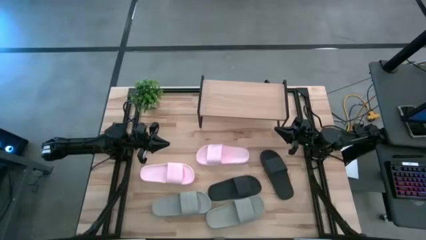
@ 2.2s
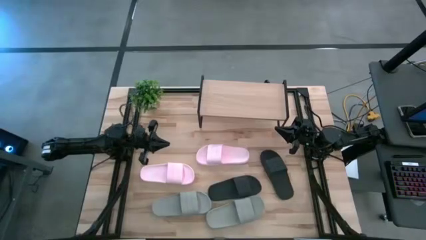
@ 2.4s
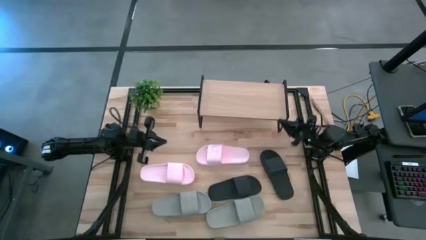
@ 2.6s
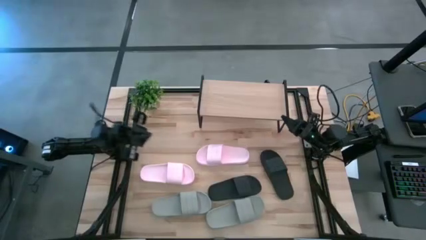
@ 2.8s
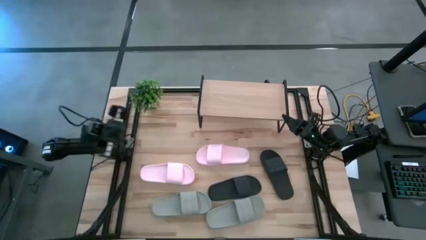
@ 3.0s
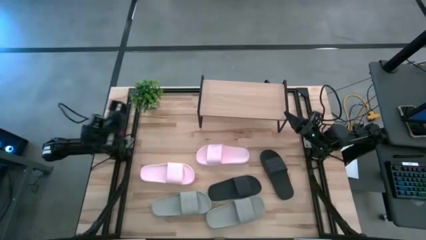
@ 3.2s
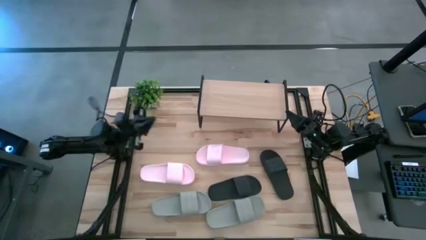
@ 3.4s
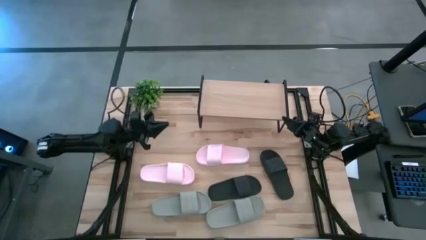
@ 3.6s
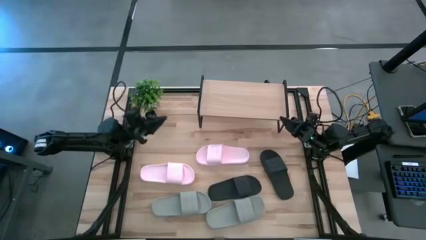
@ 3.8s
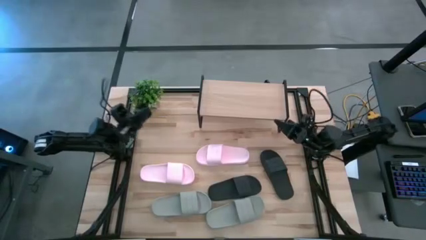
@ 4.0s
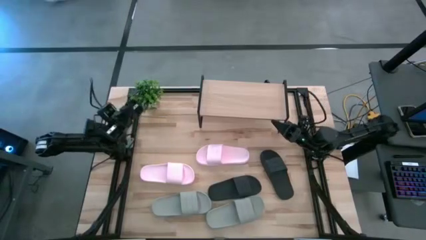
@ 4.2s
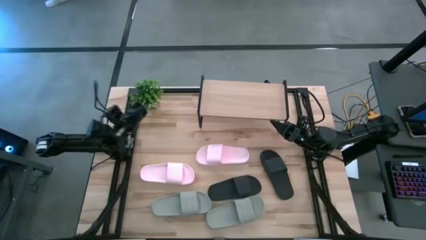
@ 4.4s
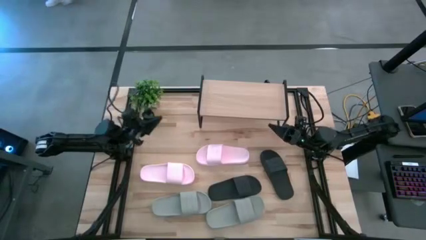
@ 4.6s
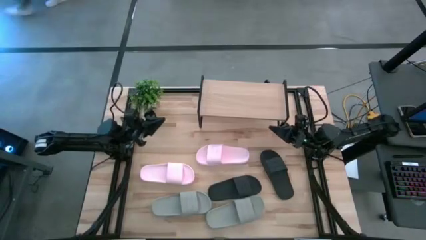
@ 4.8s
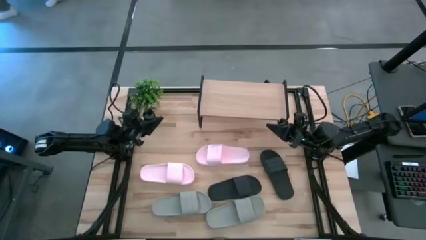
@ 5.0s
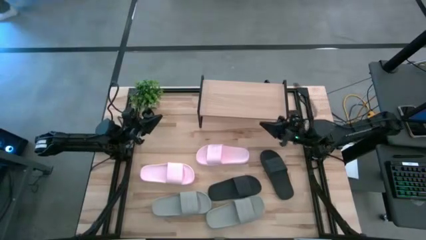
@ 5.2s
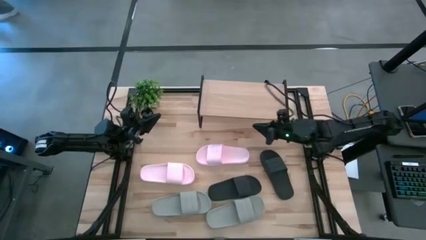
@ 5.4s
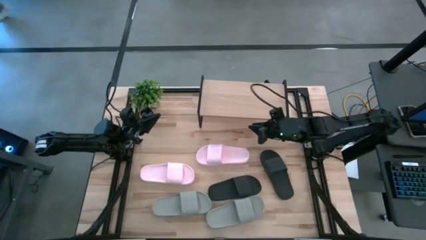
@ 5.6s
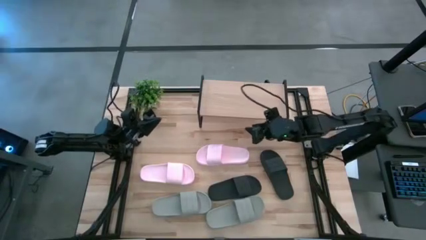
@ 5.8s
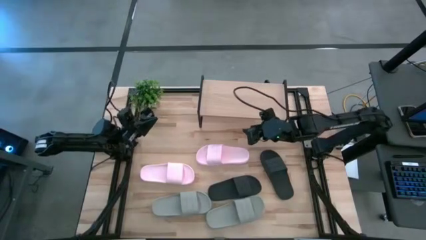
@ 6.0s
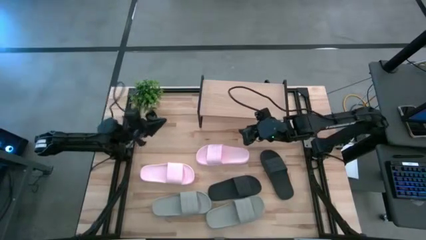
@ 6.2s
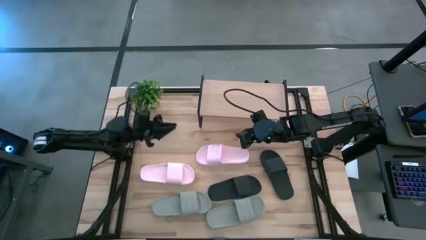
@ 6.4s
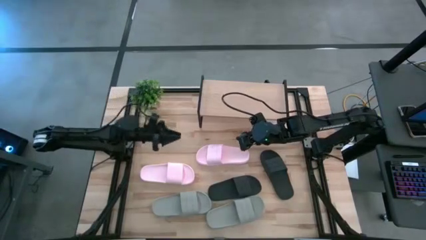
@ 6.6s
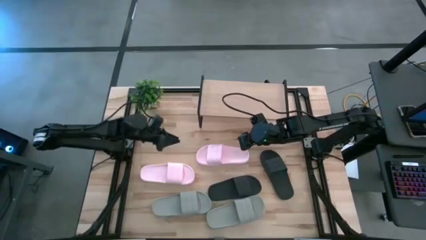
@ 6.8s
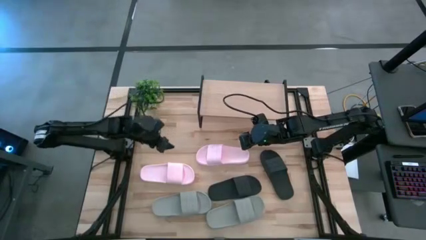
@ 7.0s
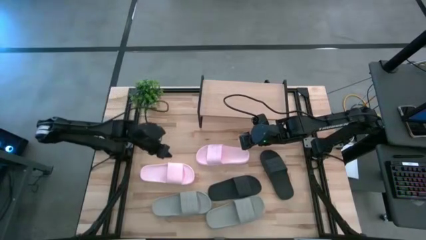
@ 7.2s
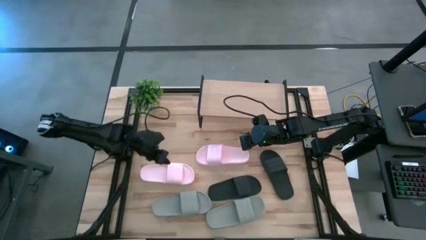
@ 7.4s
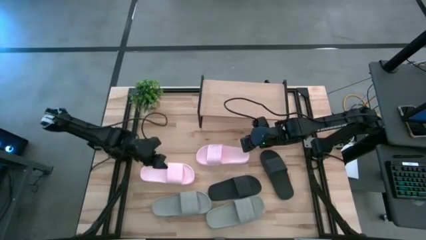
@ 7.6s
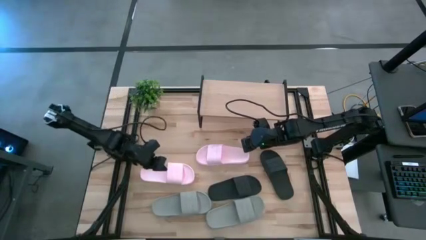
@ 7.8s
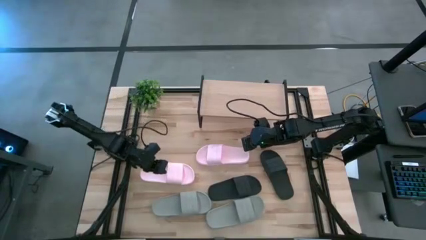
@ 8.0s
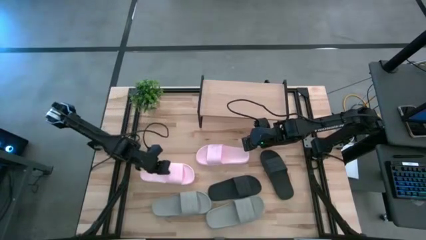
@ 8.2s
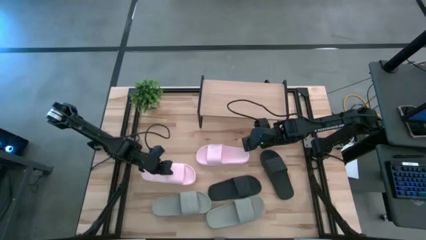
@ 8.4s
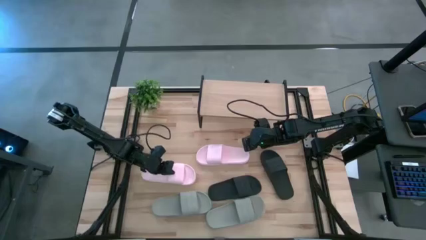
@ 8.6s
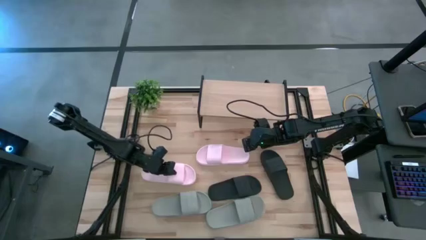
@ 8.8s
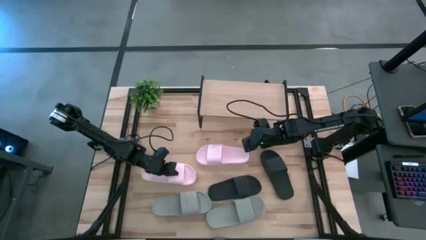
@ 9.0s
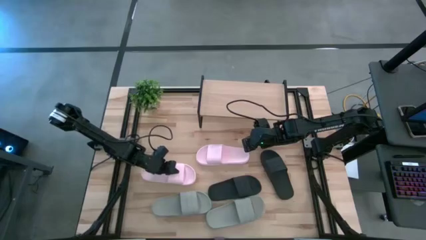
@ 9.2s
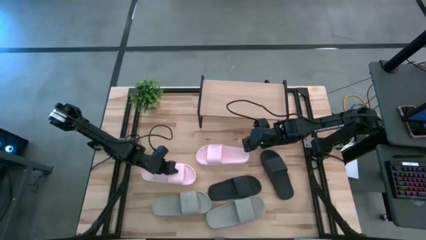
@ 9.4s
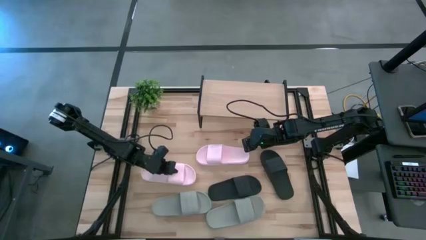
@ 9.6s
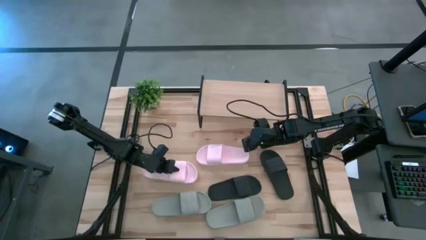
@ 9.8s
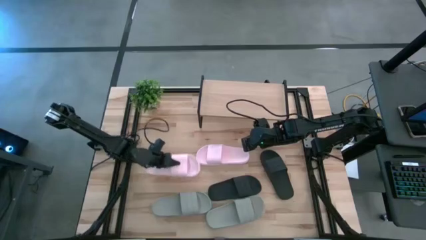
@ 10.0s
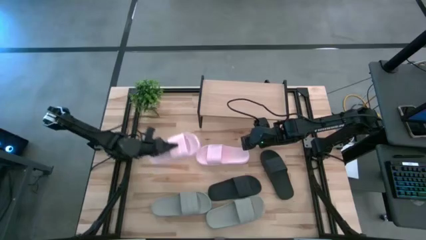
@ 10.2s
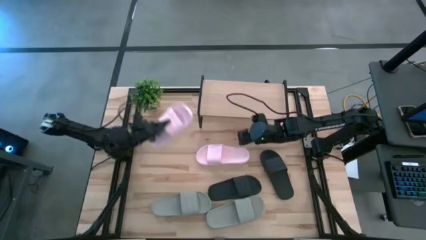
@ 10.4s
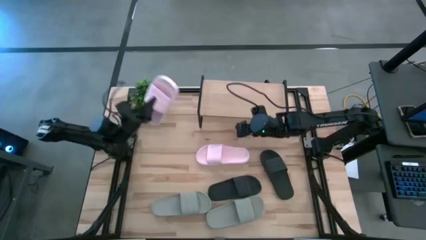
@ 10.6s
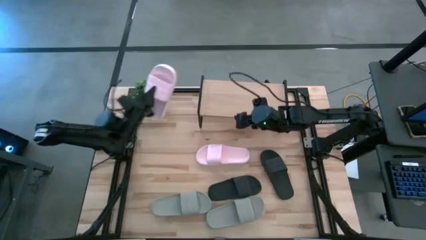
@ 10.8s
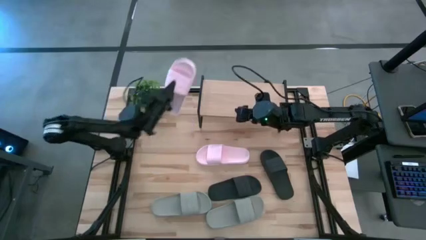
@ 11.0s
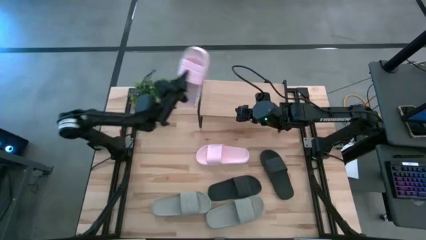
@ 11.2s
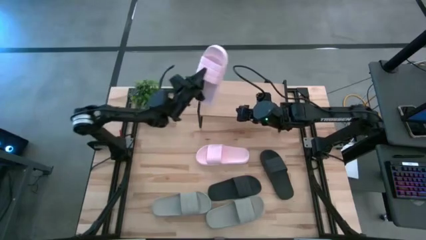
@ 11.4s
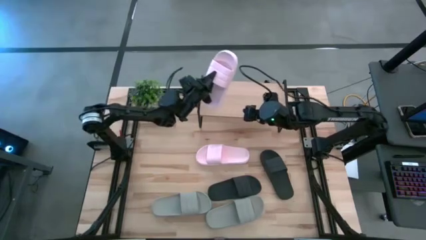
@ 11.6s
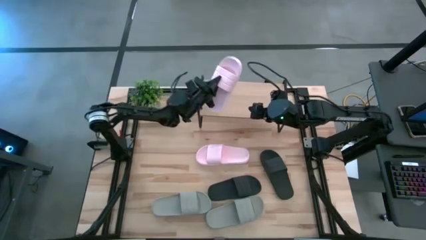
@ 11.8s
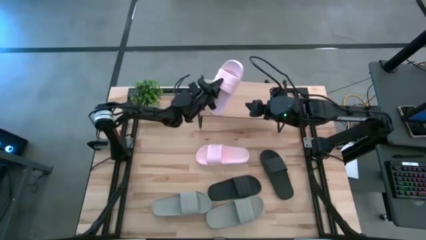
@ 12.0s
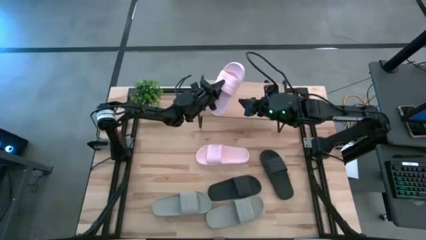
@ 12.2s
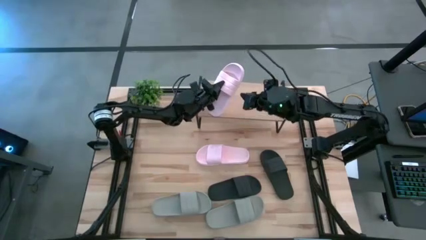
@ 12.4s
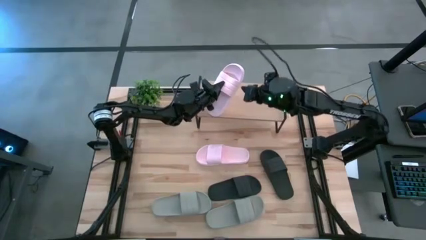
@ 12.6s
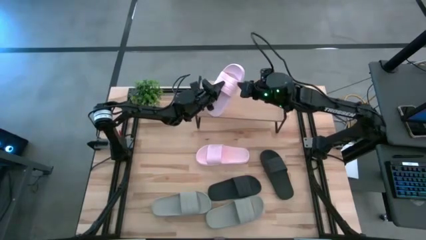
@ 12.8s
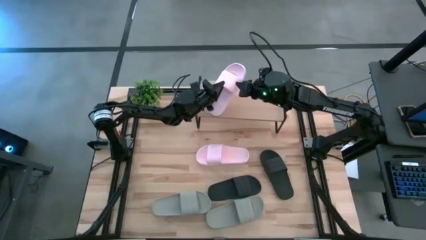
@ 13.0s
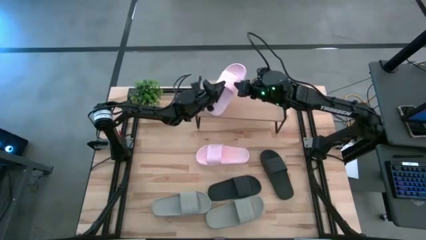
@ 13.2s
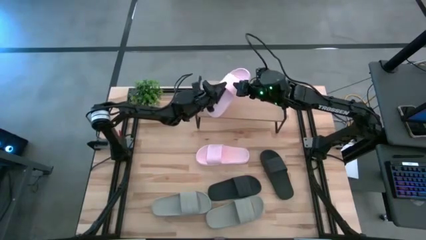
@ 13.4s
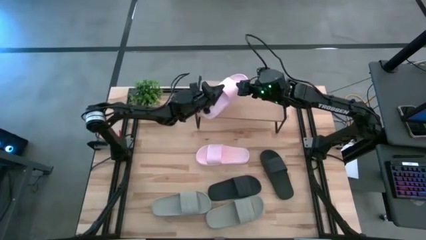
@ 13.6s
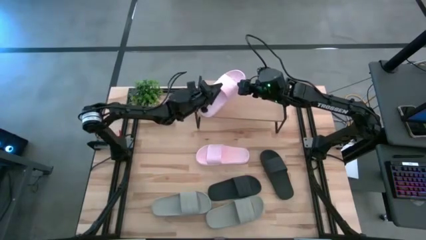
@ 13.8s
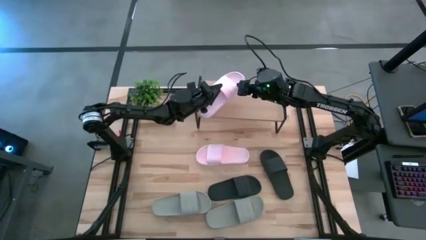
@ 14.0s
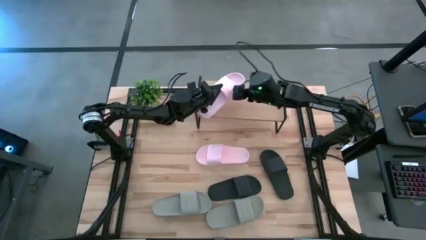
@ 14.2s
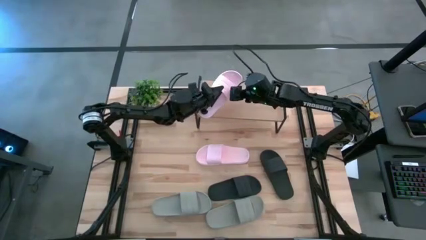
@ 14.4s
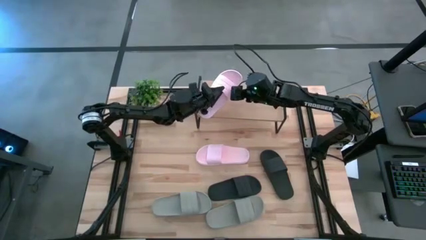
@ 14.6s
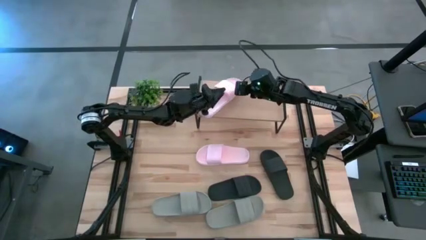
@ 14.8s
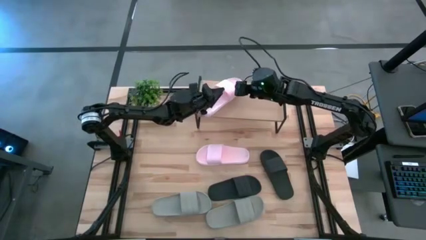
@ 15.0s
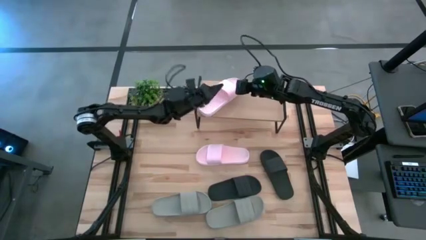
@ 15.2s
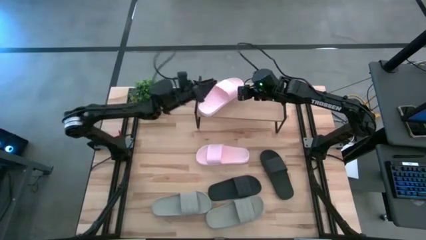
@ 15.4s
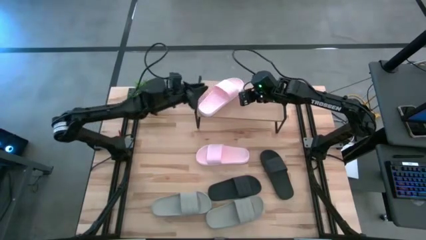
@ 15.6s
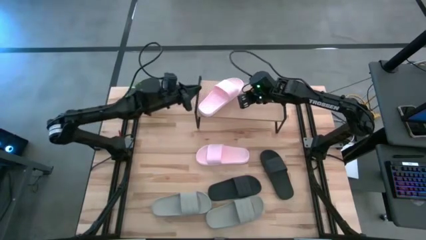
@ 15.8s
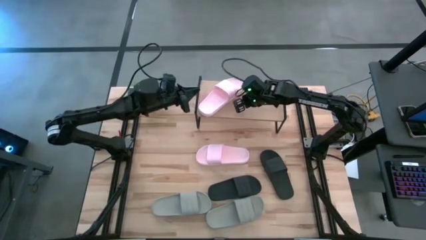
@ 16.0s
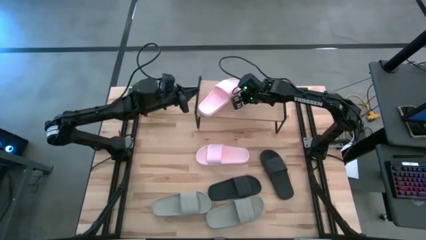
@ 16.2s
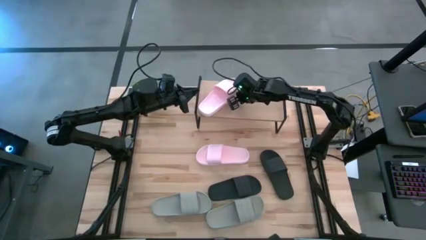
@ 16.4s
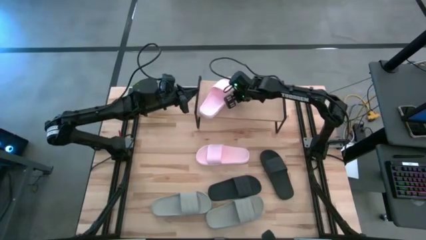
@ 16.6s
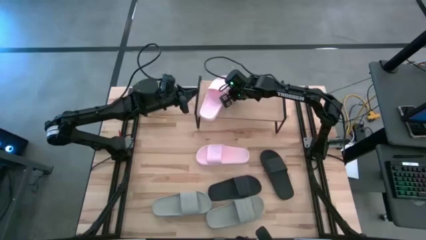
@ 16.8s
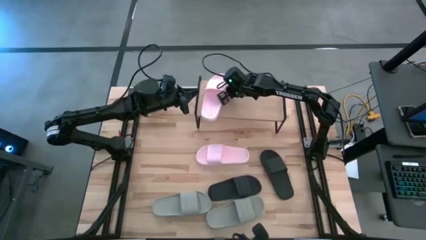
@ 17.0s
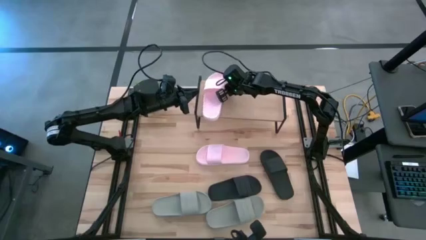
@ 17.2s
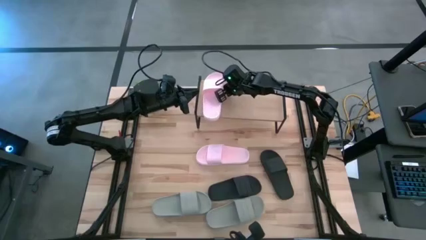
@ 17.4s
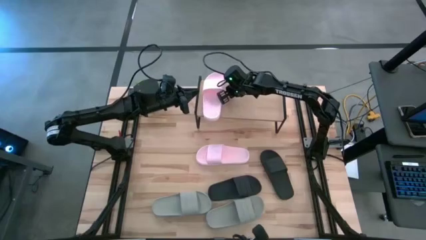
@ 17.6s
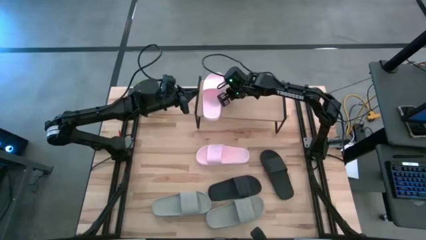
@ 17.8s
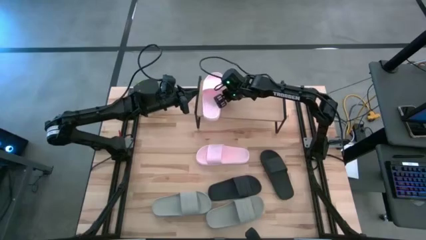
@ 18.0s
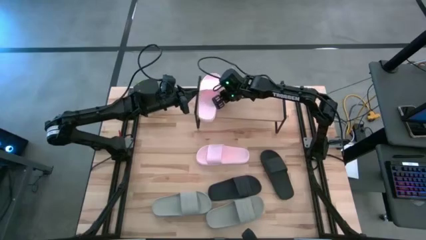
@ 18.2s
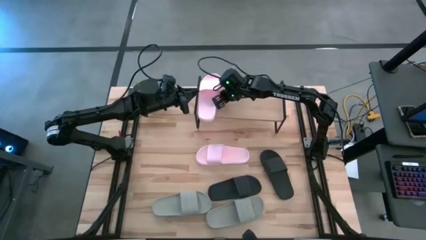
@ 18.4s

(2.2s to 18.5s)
Task: Pick and place slides into the shelf
Put the left pink slide on the shelf
